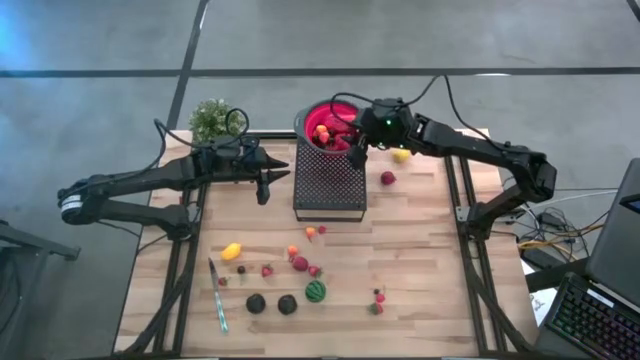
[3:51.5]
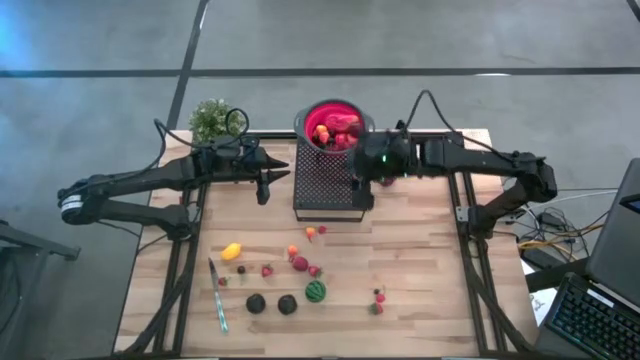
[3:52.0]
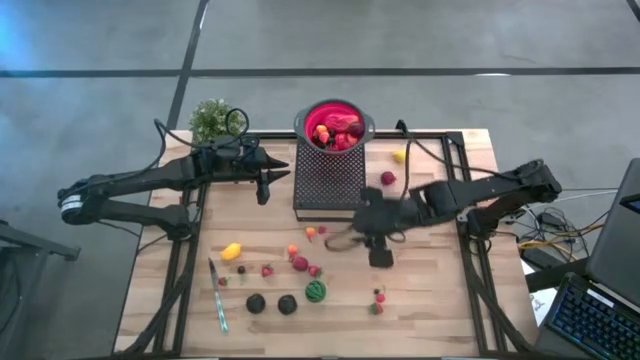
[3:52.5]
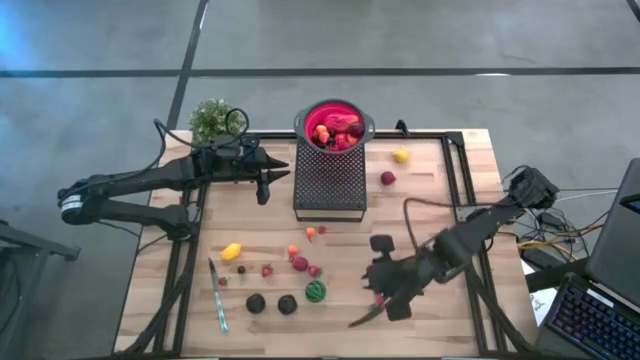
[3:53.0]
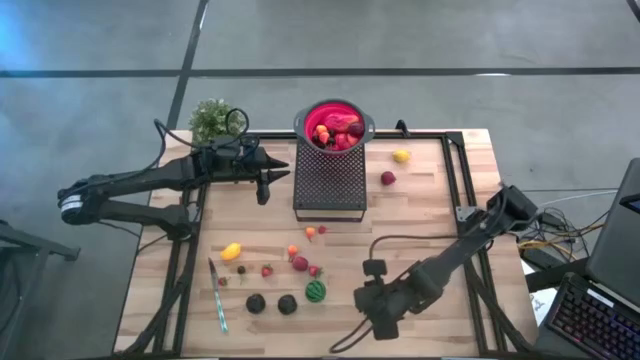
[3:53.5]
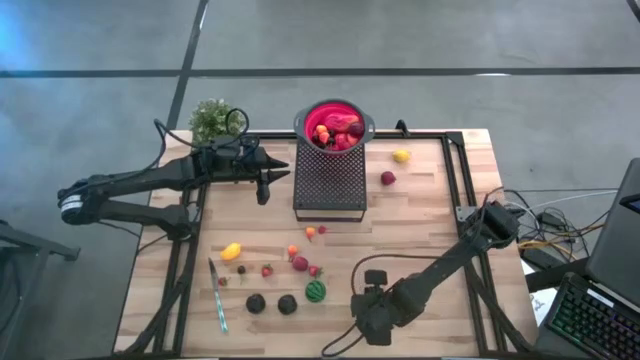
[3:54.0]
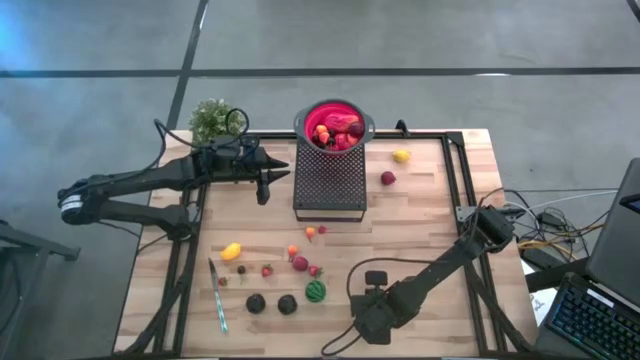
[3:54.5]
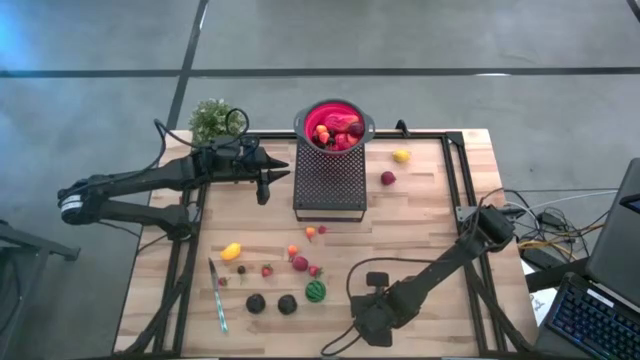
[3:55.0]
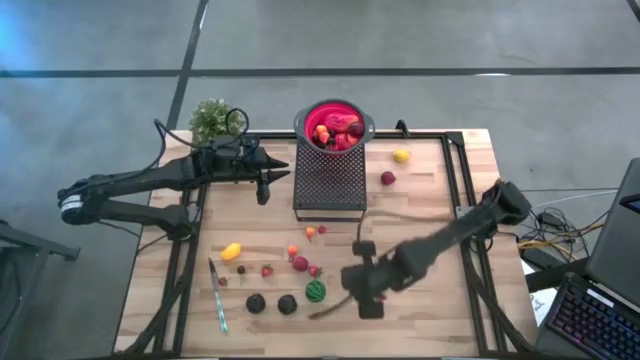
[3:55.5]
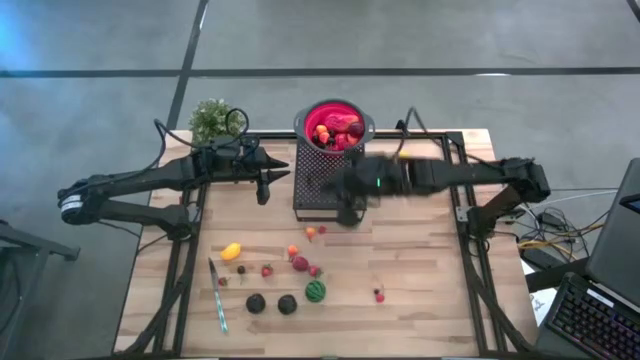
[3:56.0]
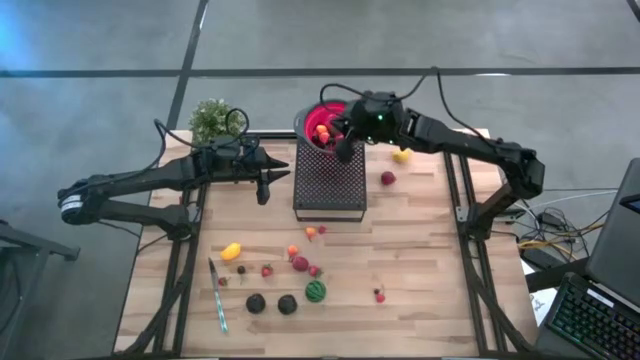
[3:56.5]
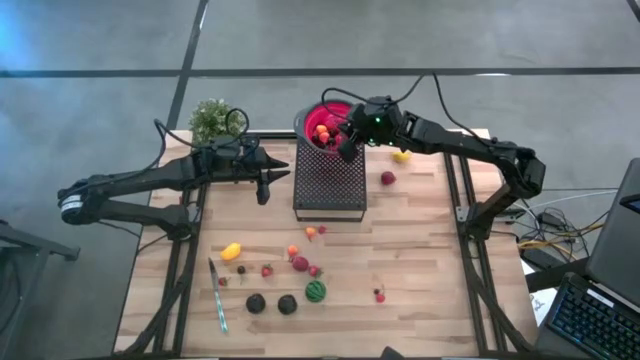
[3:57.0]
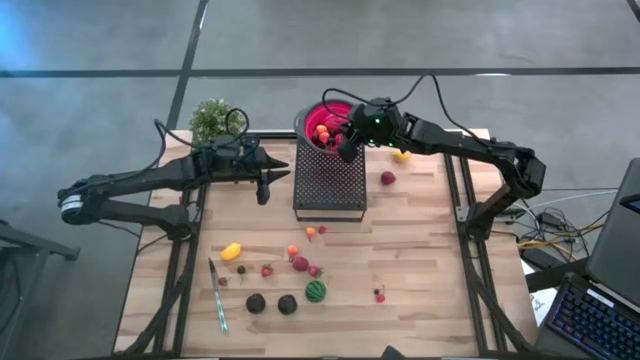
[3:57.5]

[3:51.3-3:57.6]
Task: Pick & Place Fruit
Put the strawberry into the red strainer bowl on the shelf

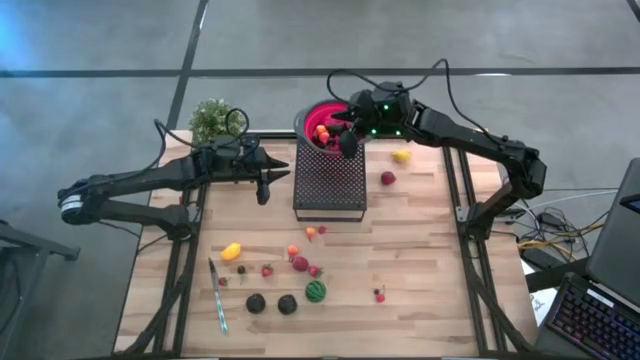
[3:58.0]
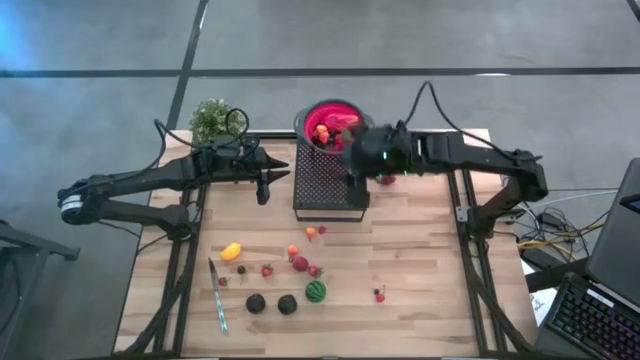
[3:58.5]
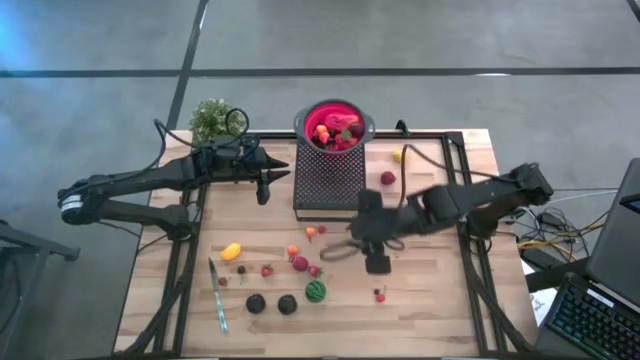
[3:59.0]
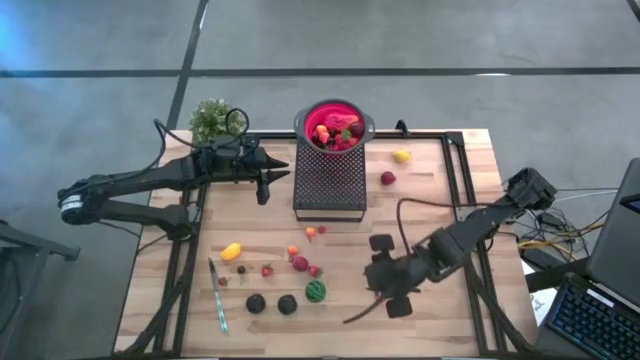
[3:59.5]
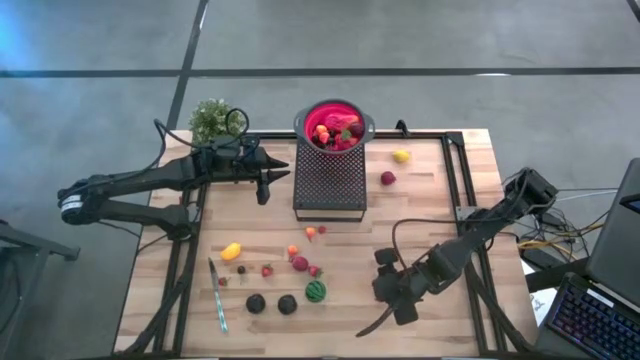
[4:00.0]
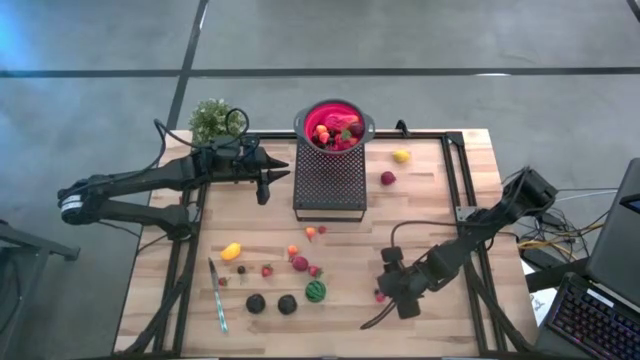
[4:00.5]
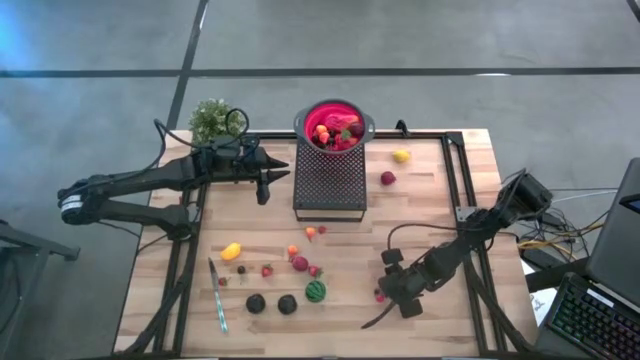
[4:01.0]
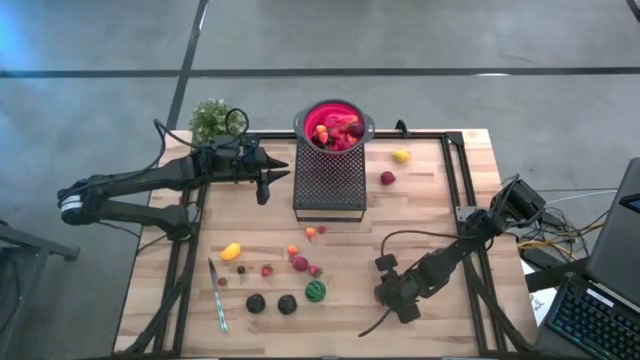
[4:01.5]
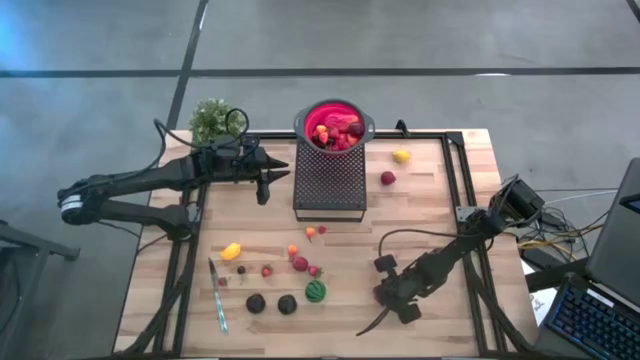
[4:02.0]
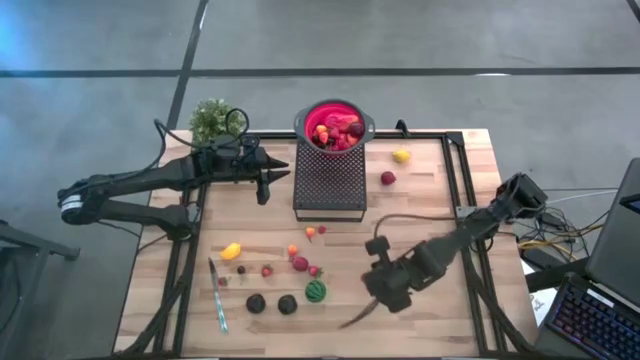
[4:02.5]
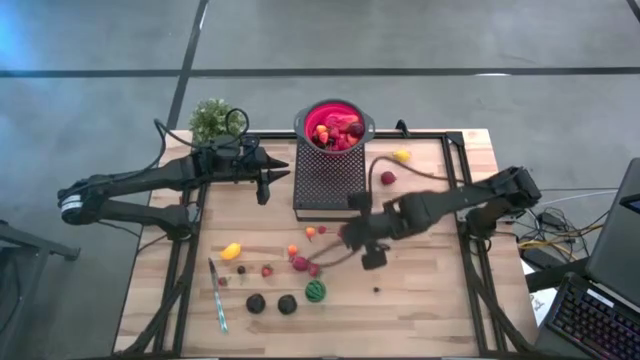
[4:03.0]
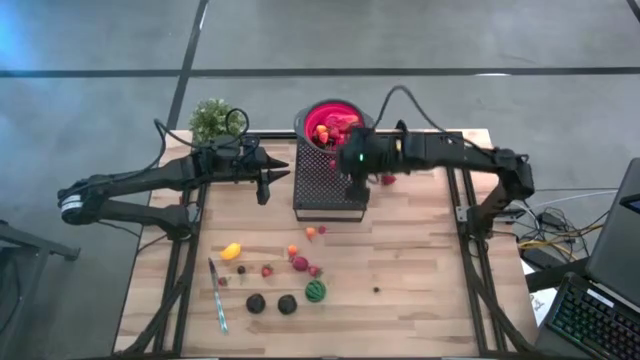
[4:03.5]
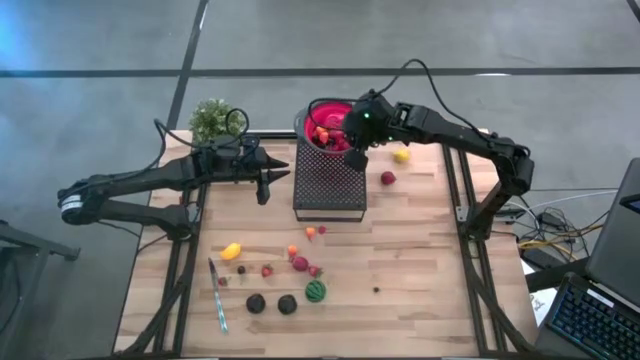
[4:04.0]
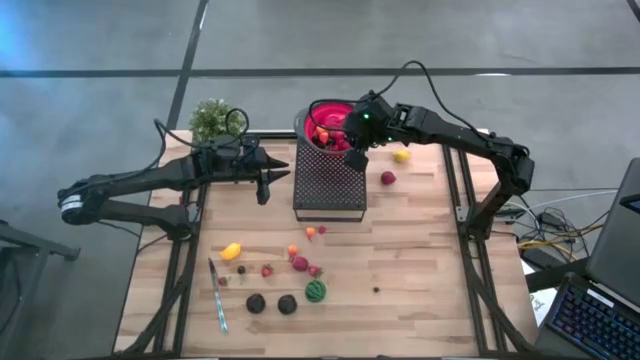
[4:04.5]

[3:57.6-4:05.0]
Put the red cherry into the red strainer bowl on the shelf

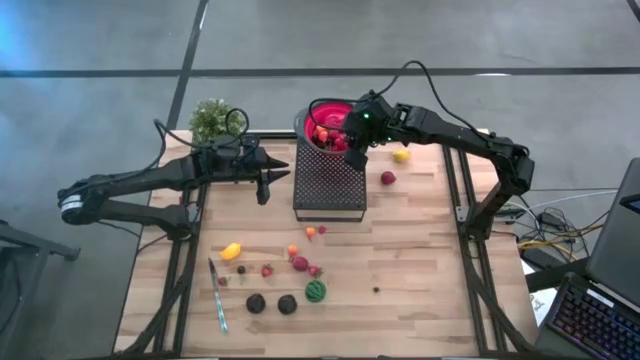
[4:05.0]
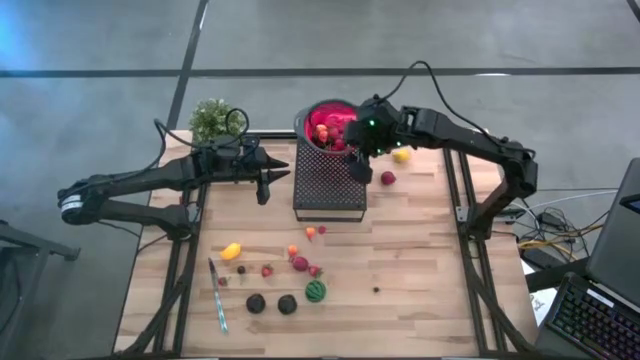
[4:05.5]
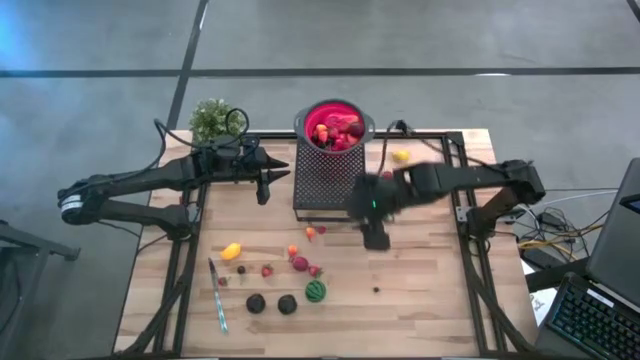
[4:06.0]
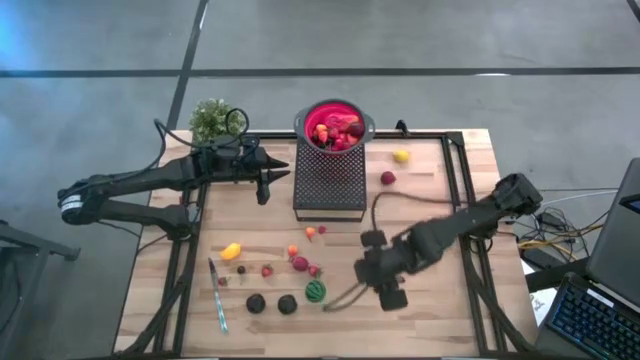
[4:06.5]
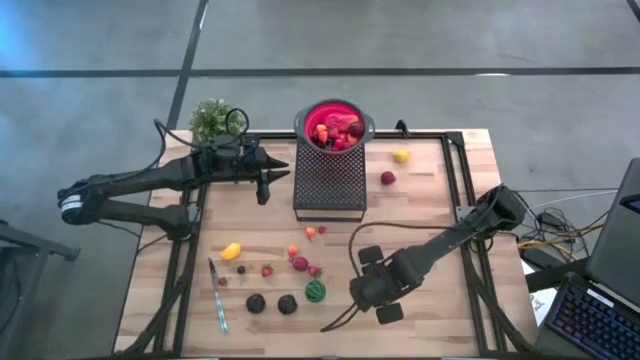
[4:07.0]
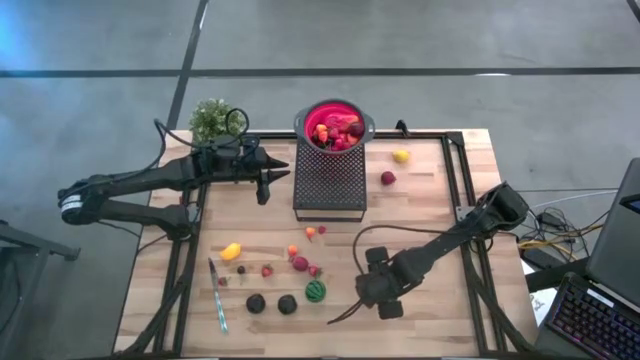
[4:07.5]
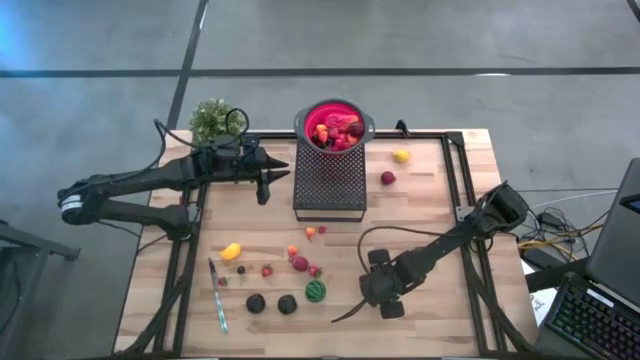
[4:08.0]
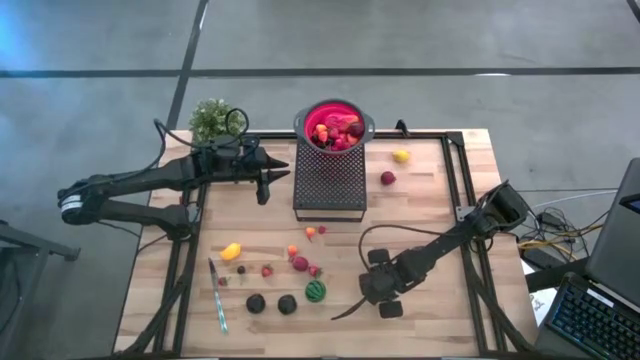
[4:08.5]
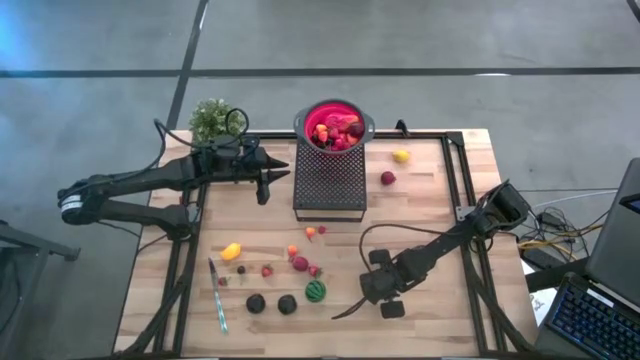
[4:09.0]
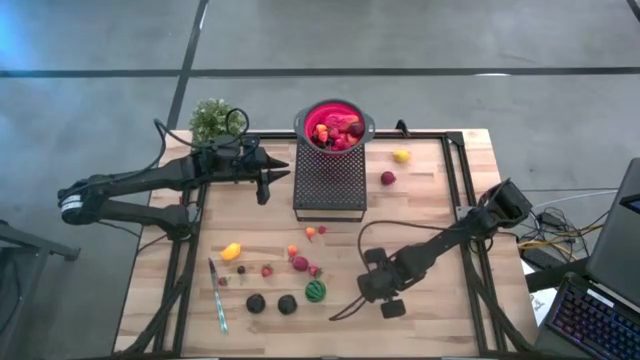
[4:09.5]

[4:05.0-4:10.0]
Put the blueberry into the red strainer bowl on the shelf

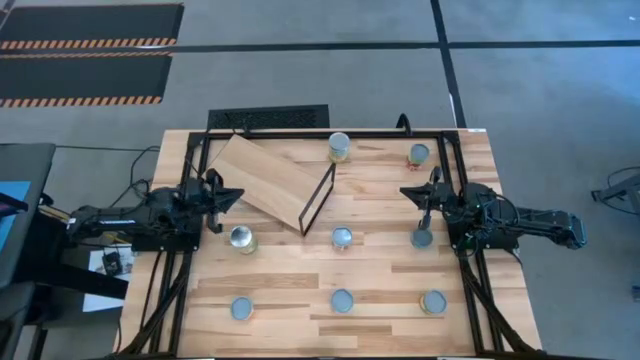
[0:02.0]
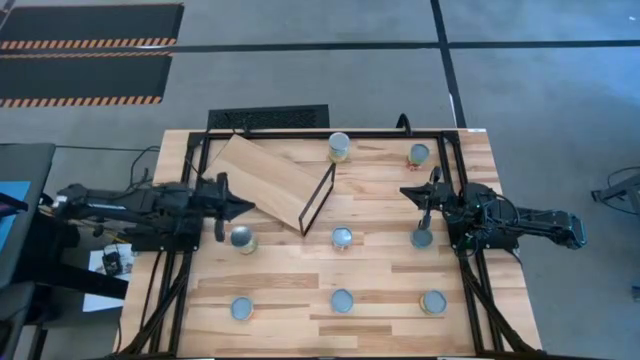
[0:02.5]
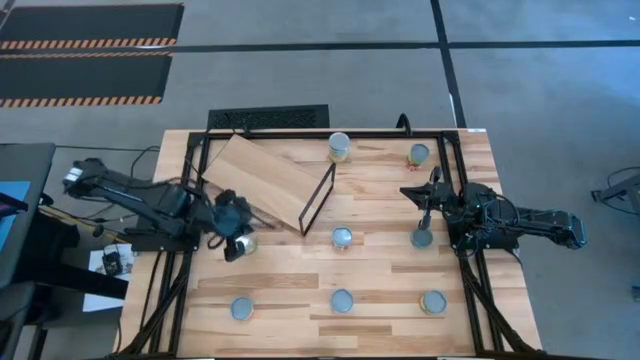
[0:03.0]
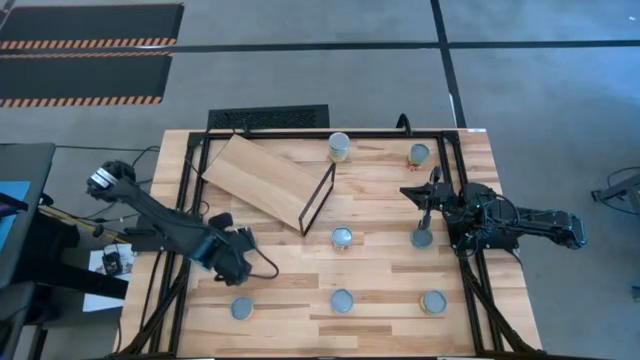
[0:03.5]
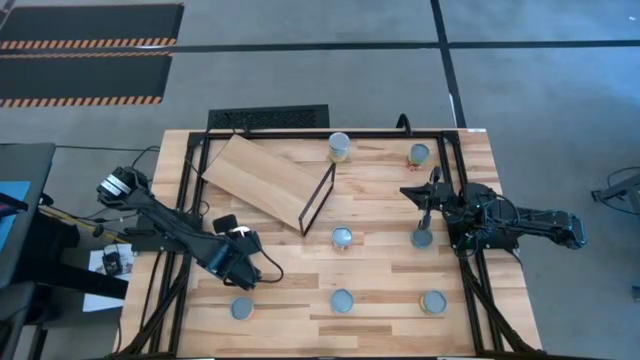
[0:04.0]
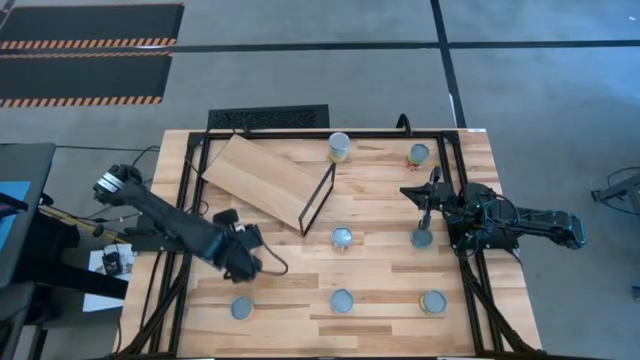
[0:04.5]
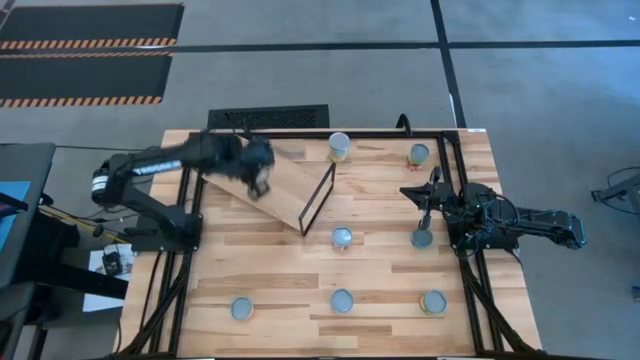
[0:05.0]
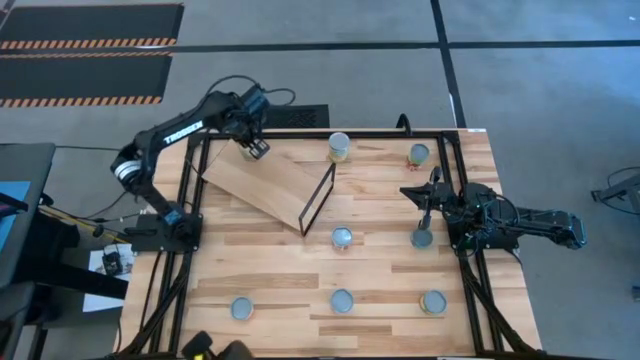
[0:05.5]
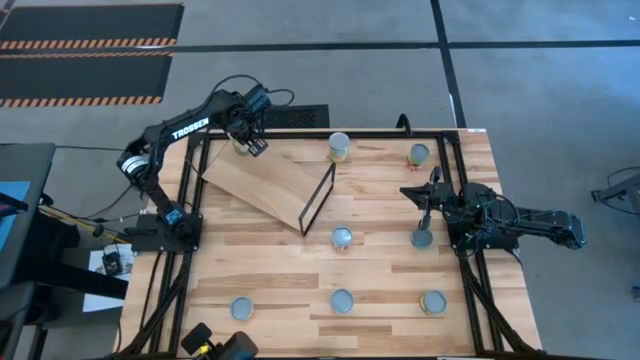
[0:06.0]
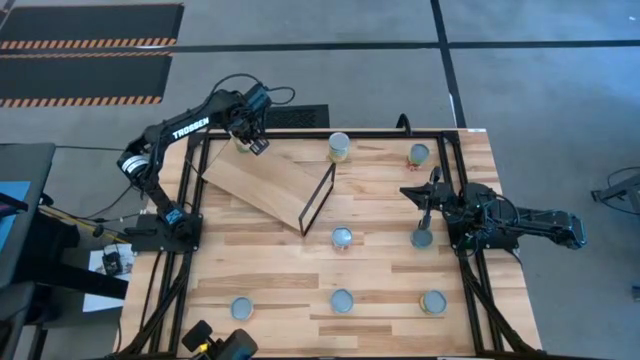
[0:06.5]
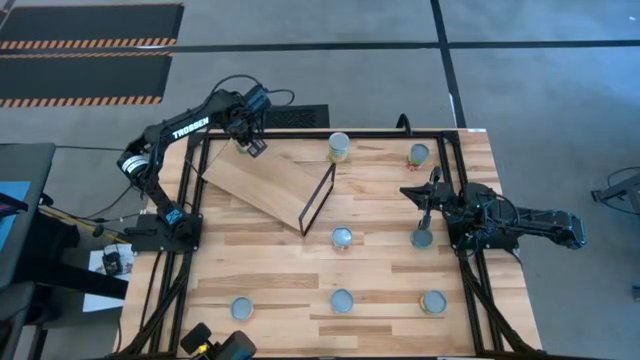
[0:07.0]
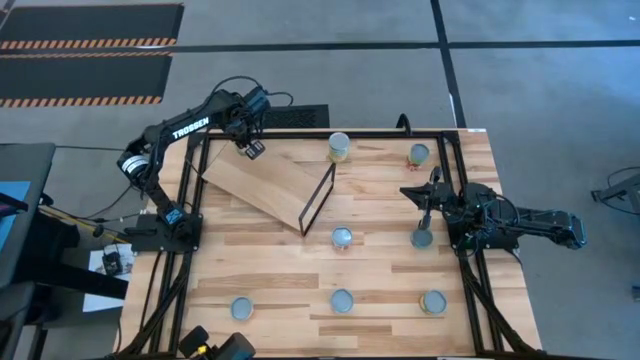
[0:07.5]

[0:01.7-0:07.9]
Task: Pick and place cans onto a shelf
Put the canned oranges on the shelf
